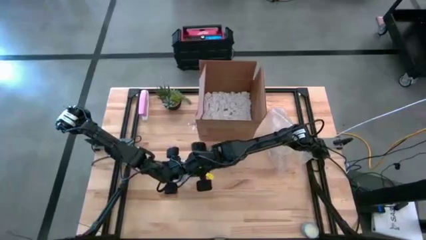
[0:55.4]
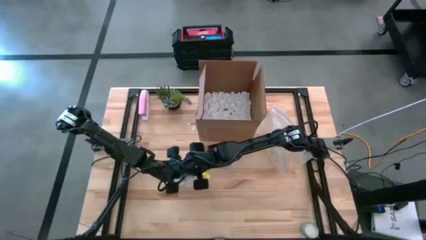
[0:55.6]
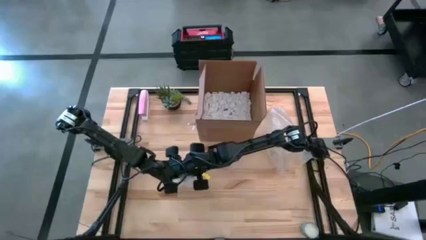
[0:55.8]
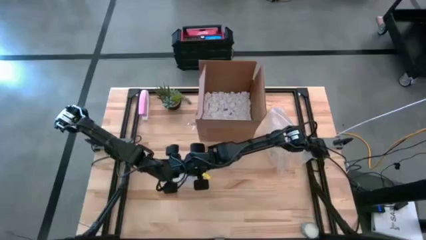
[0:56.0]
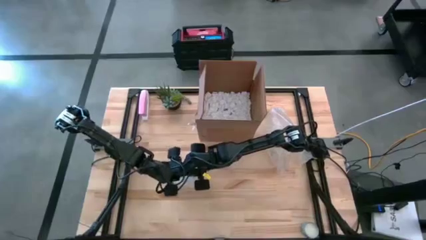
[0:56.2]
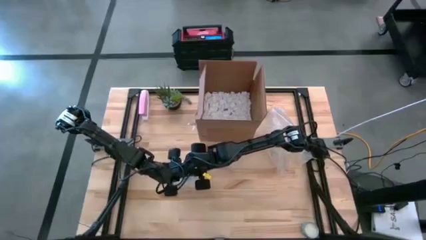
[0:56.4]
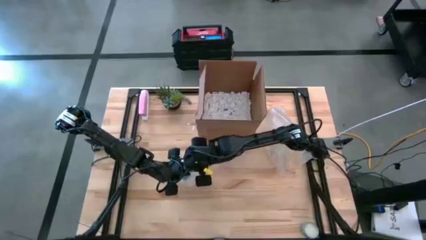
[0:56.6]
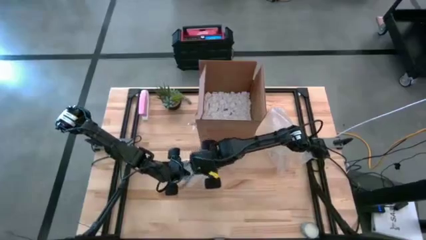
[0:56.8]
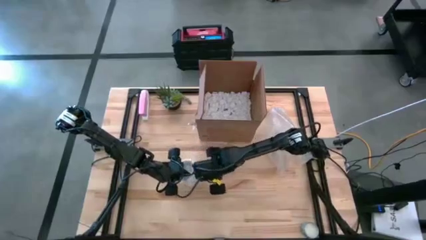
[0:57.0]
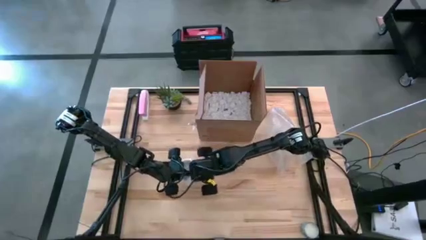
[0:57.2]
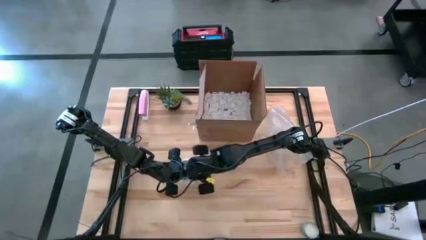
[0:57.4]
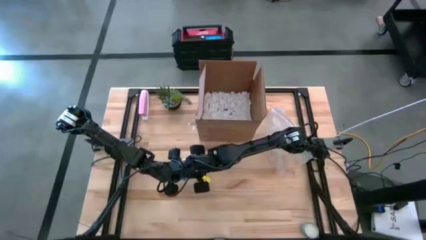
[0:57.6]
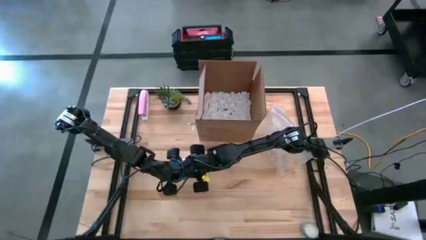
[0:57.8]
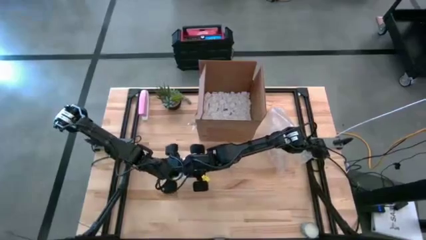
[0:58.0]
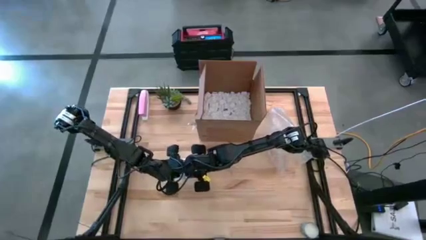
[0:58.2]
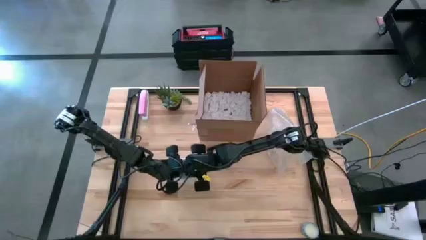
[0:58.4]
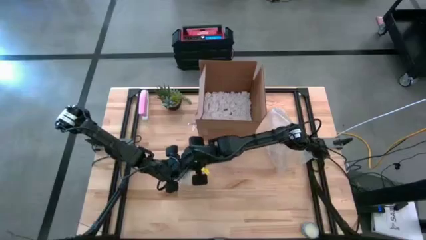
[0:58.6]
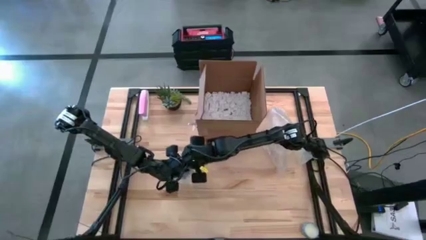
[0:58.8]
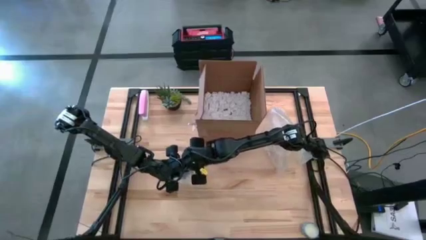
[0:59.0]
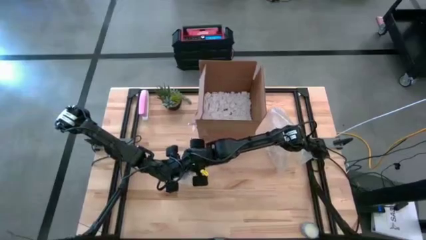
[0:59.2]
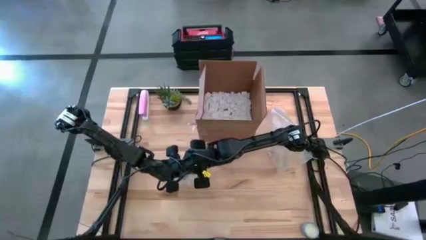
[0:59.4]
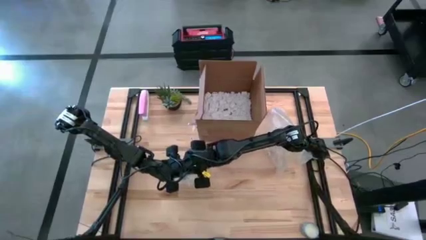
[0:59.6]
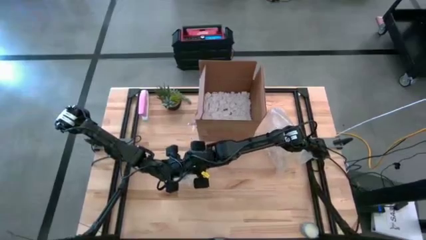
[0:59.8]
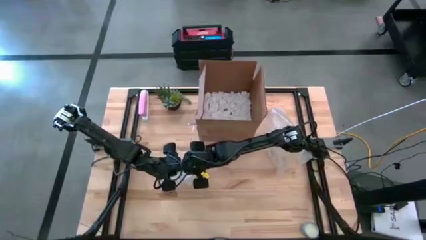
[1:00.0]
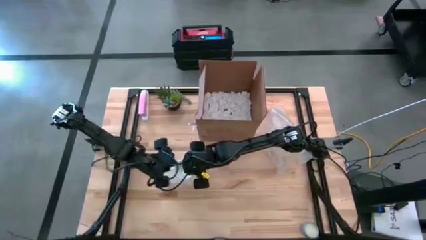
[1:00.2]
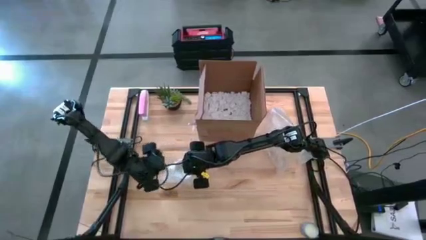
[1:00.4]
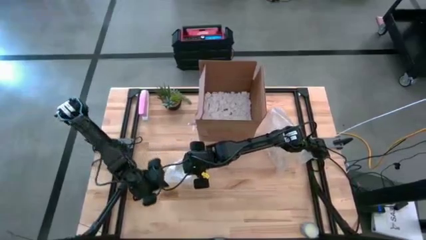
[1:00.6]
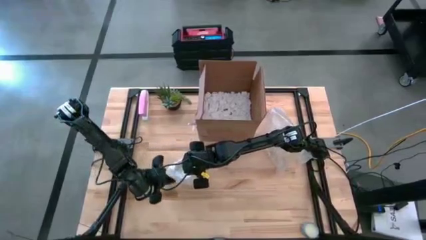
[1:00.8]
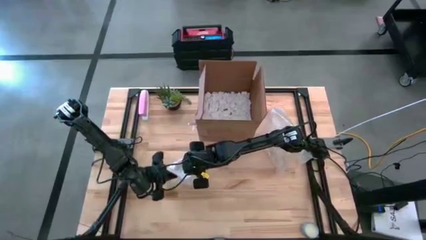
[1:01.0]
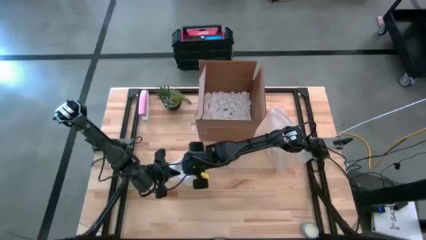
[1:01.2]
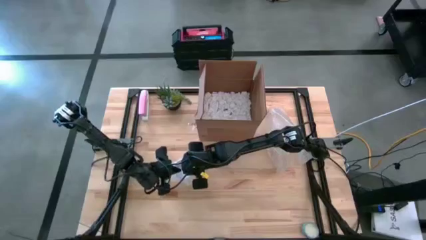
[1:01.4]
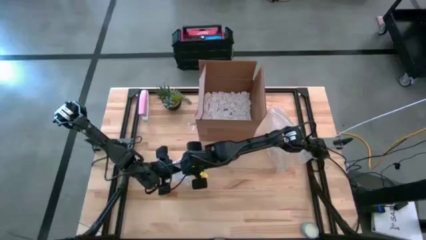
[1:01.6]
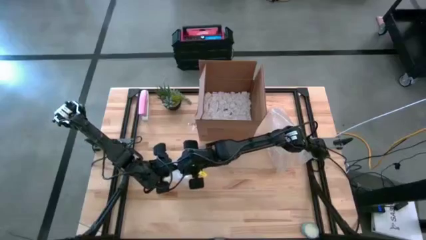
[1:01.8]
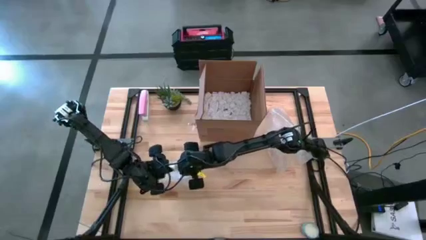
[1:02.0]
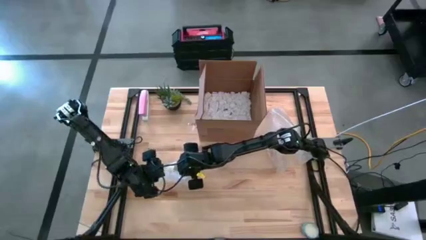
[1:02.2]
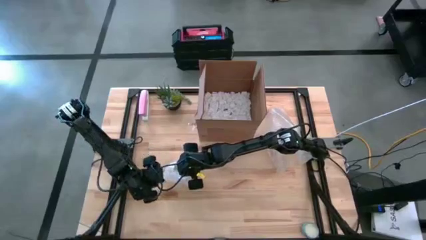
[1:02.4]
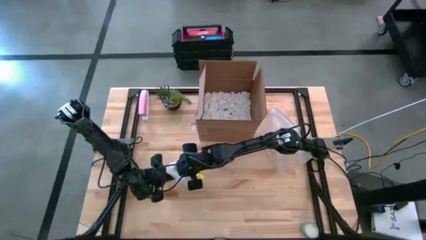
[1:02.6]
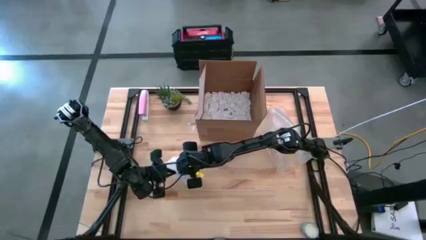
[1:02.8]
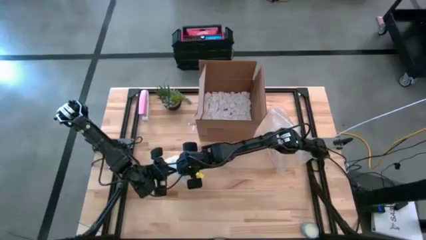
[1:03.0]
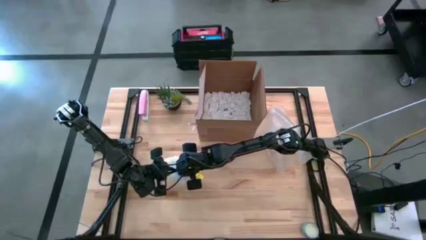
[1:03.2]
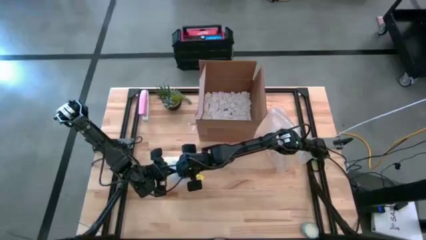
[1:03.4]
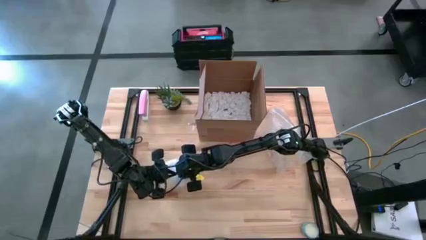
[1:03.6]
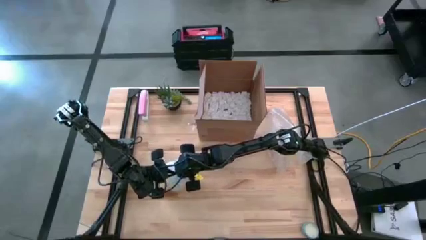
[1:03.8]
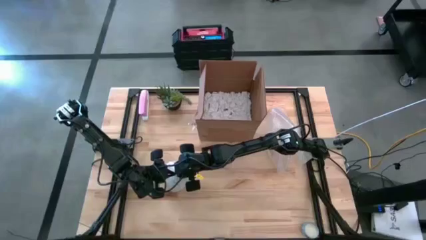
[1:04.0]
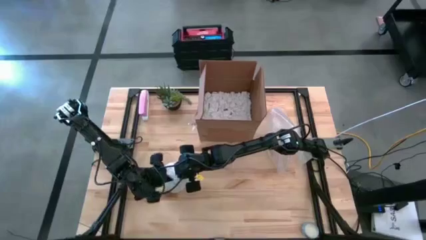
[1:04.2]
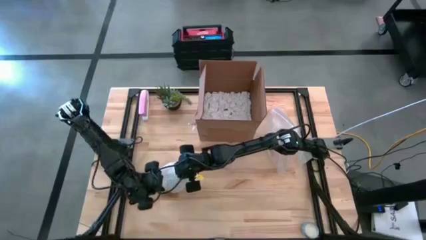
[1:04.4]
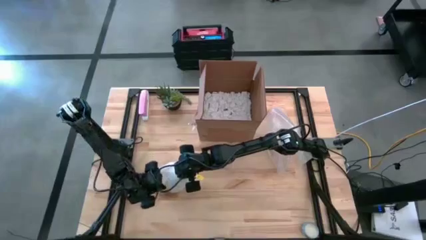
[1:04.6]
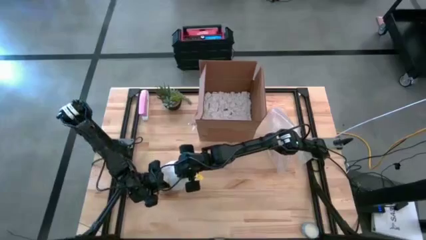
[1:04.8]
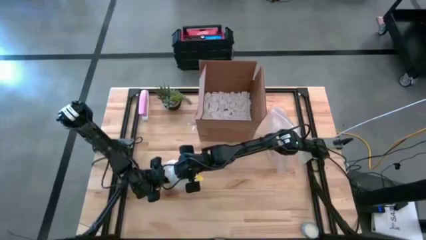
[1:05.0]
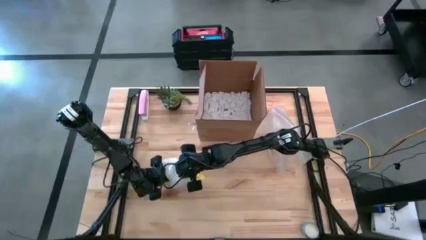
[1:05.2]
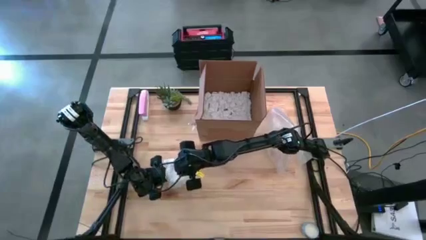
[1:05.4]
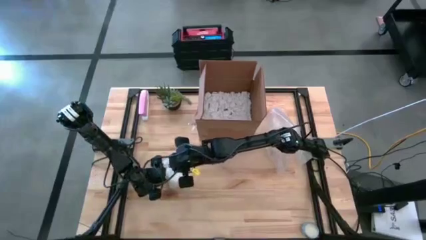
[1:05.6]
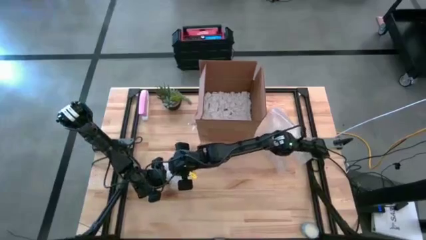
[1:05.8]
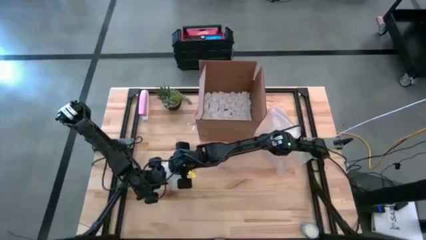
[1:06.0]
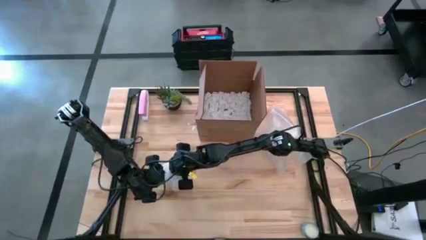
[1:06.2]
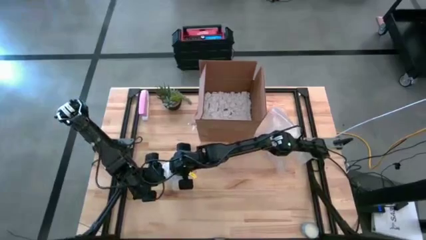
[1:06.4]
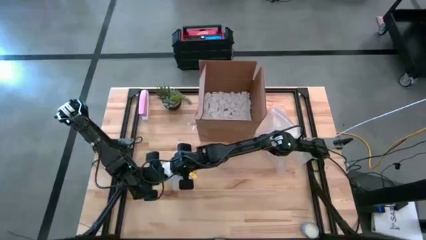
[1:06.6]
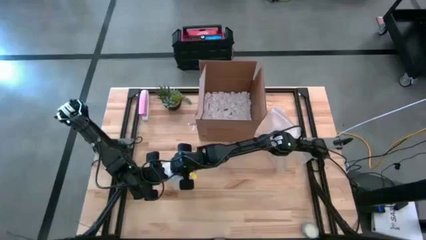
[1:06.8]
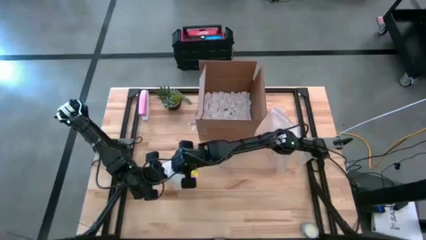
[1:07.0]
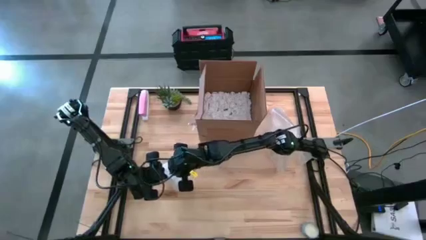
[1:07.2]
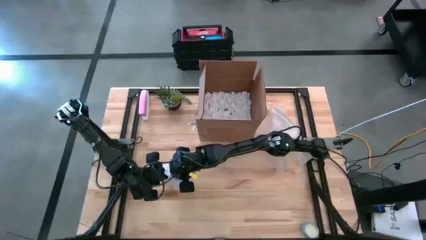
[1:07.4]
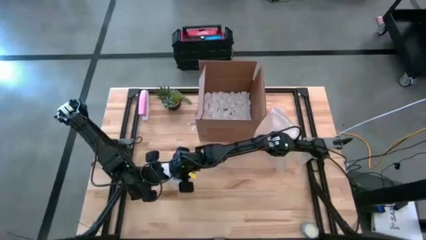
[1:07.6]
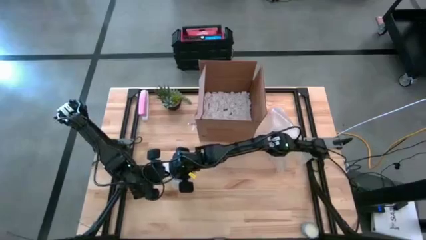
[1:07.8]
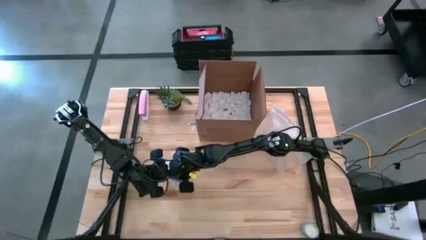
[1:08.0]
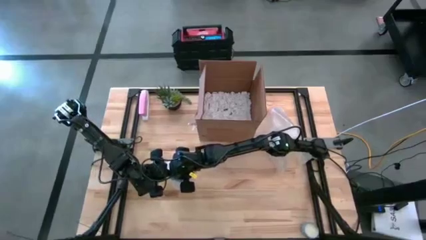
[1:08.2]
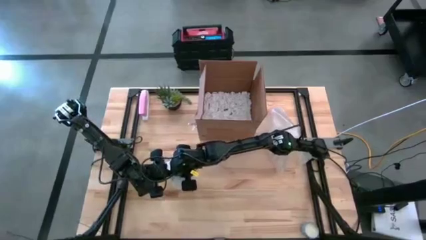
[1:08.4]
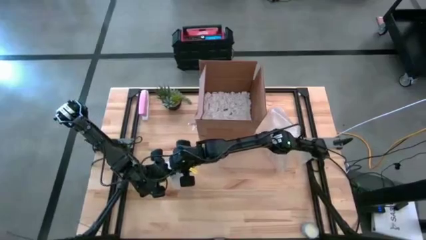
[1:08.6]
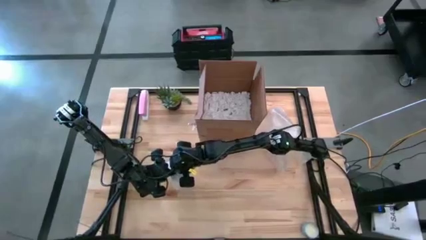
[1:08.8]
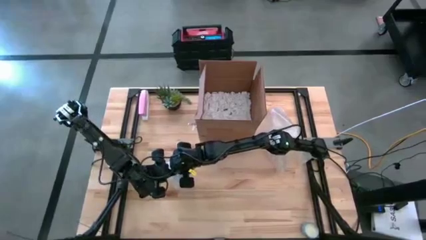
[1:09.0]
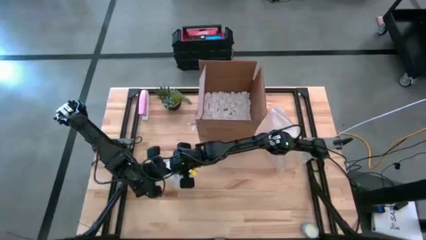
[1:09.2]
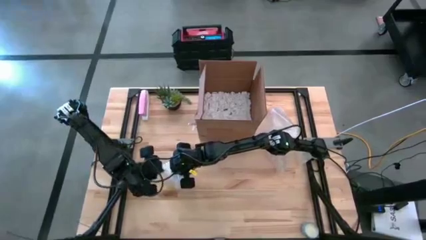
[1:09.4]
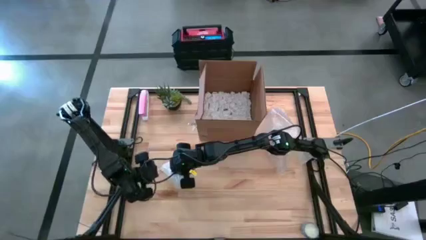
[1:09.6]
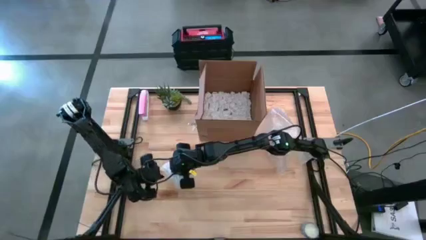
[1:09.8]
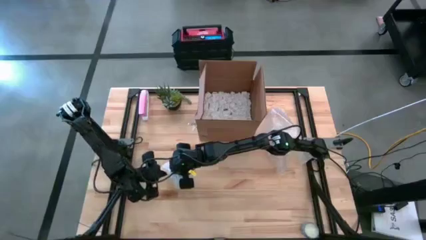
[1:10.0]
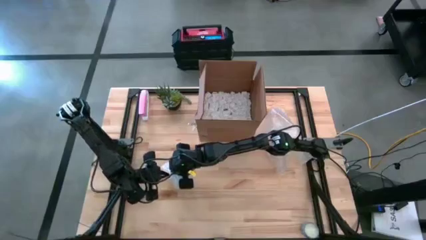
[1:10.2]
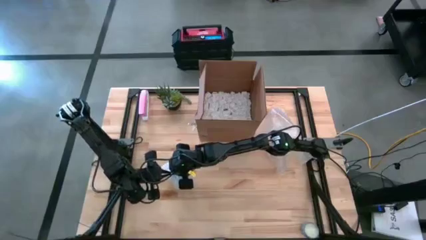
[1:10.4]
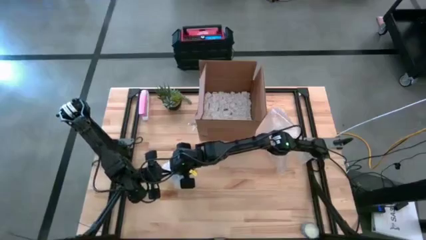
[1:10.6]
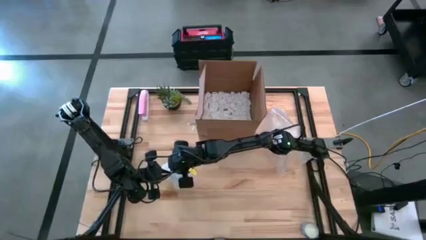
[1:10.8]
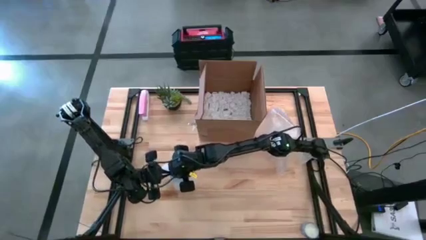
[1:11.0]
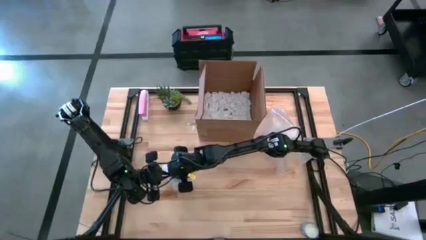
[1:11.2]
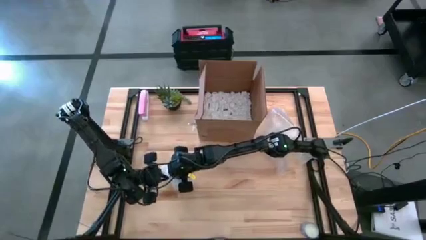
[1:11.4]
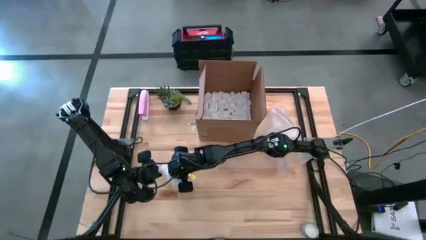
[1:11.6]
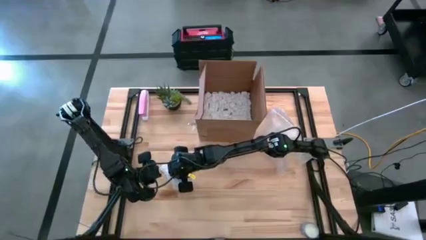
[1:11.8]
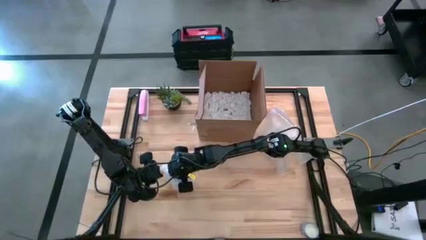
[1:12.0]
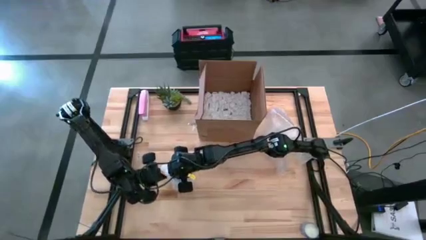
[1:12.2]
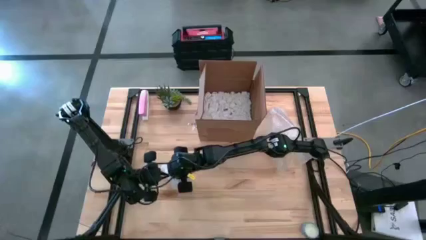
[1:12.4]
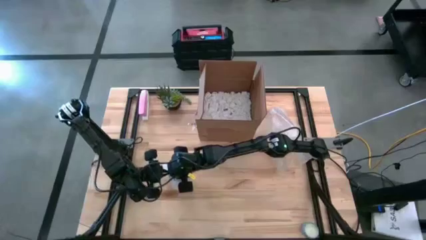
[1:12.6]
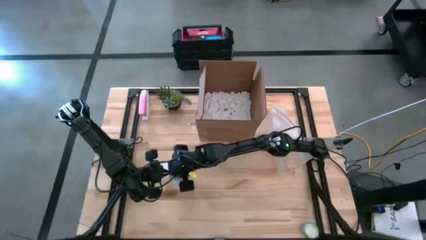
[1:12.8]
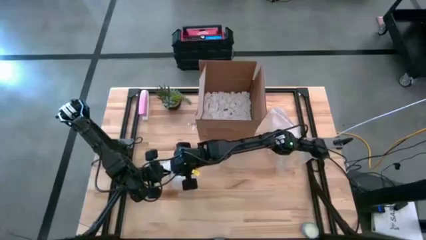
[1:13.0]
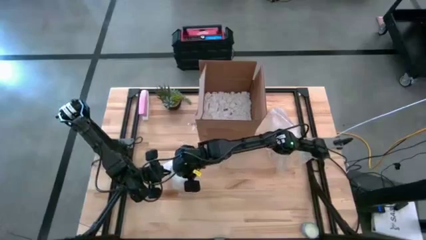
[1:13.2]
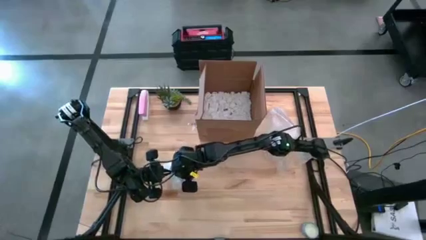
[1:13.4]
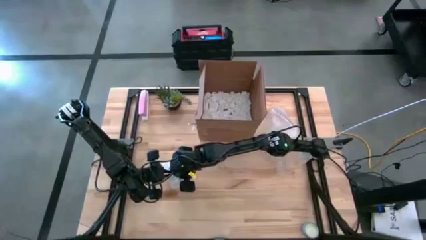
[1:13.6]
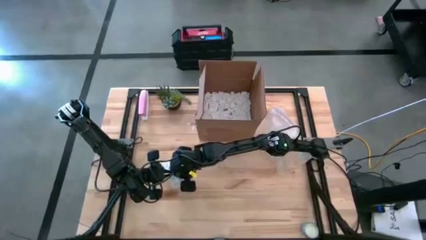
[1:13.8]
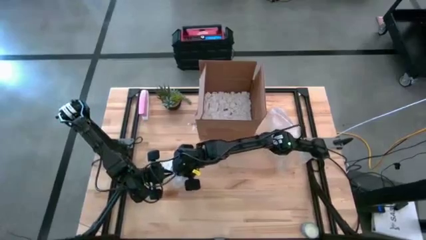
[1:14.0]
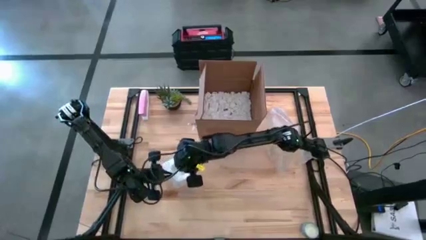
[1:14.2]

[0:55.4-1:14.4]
Task: wrap mug
Wrap the gray mug with bubble wrap
